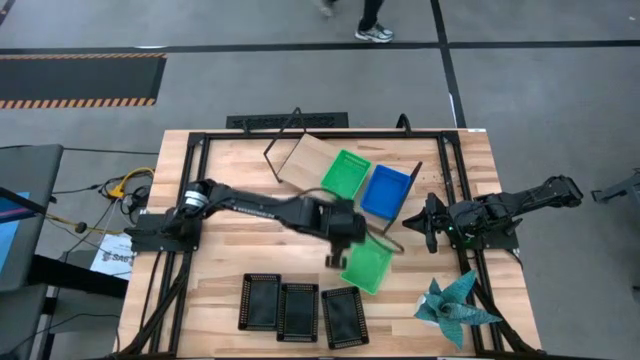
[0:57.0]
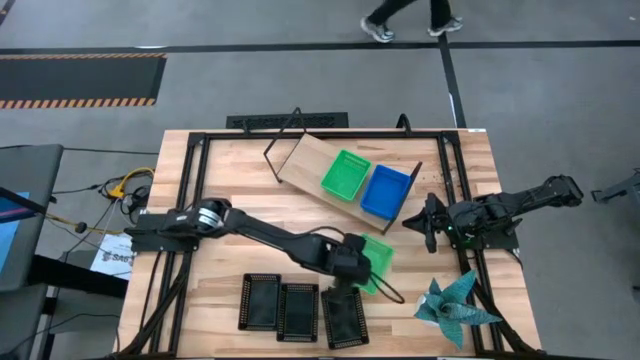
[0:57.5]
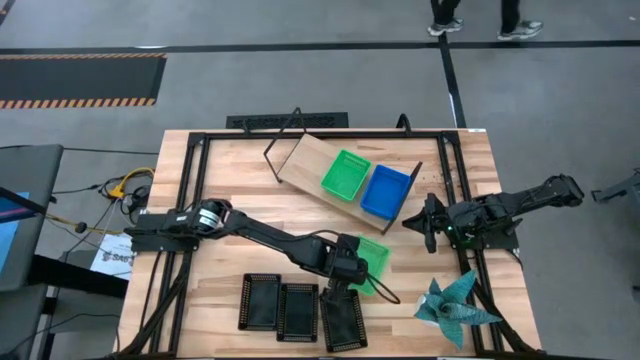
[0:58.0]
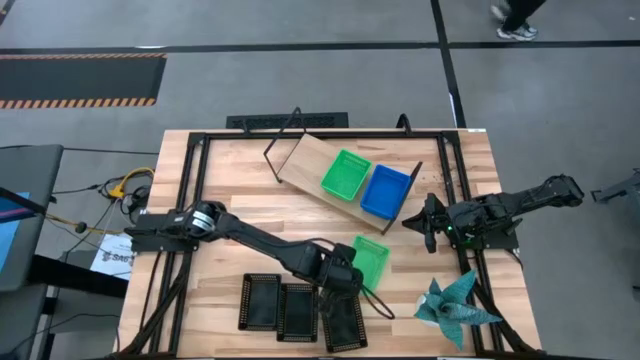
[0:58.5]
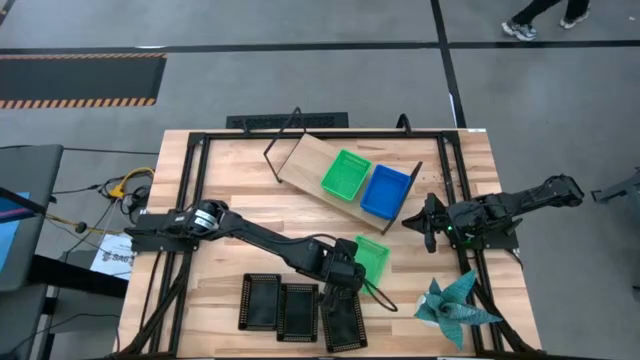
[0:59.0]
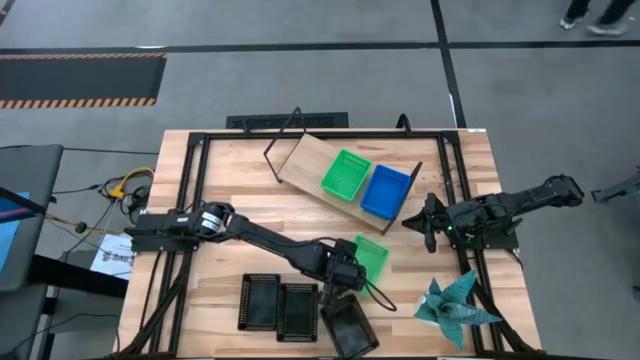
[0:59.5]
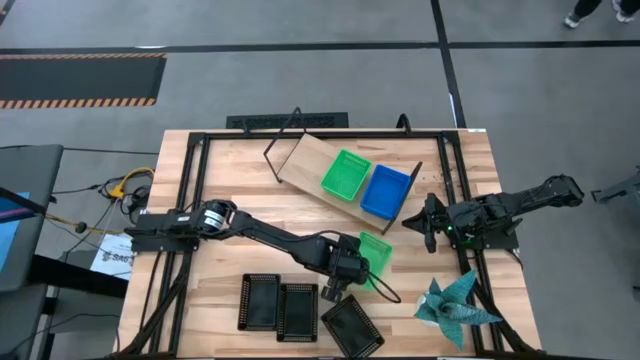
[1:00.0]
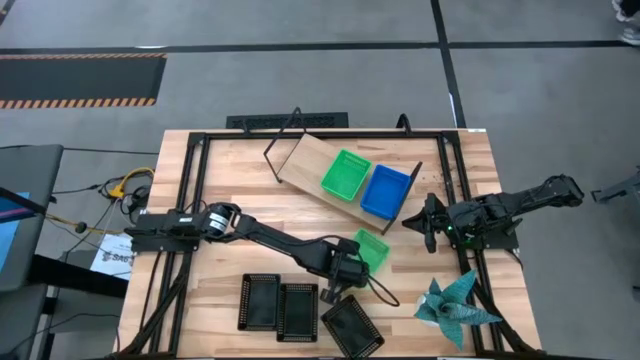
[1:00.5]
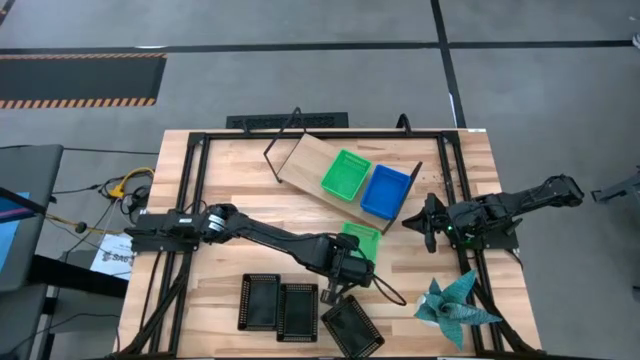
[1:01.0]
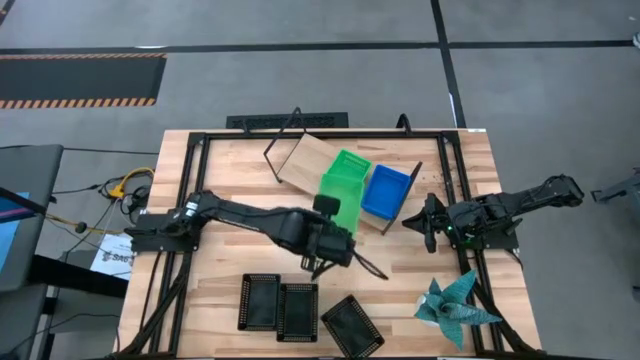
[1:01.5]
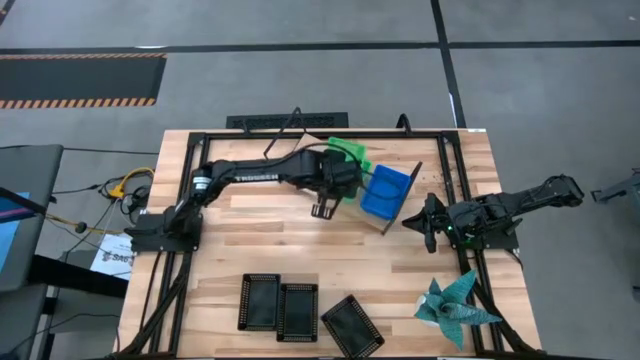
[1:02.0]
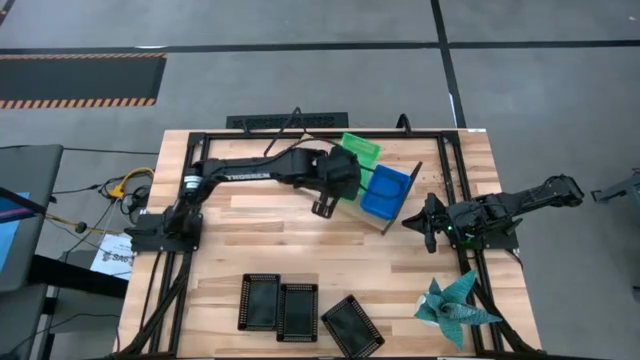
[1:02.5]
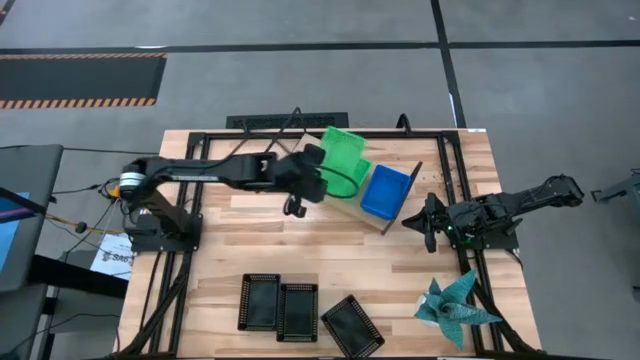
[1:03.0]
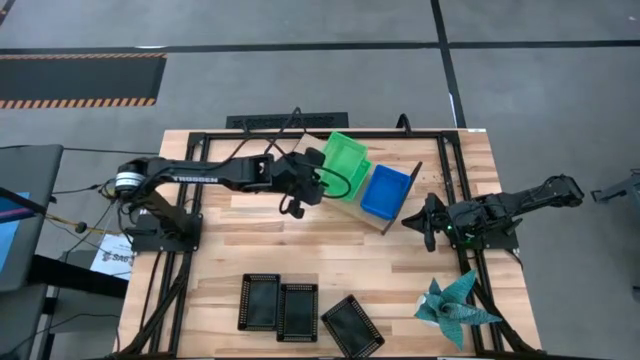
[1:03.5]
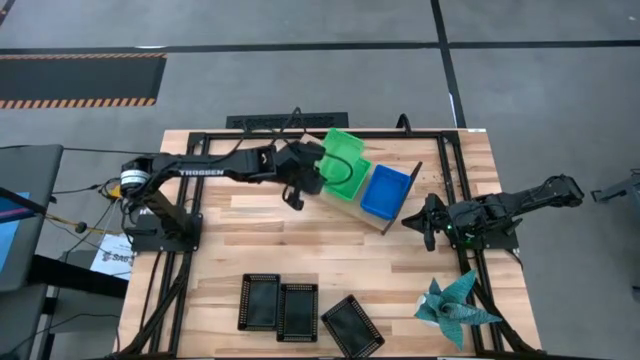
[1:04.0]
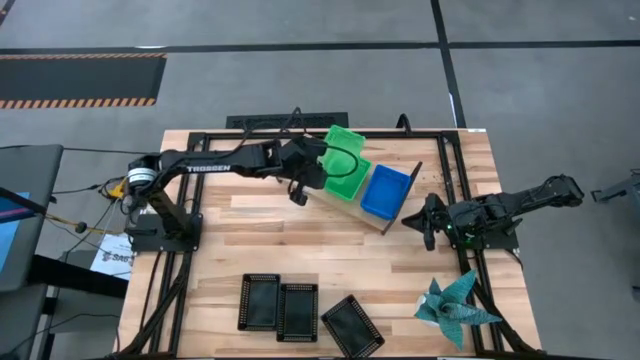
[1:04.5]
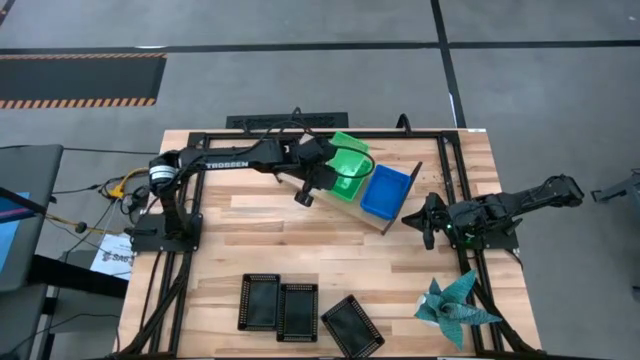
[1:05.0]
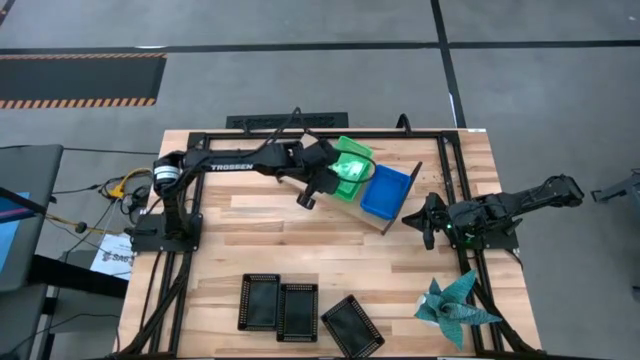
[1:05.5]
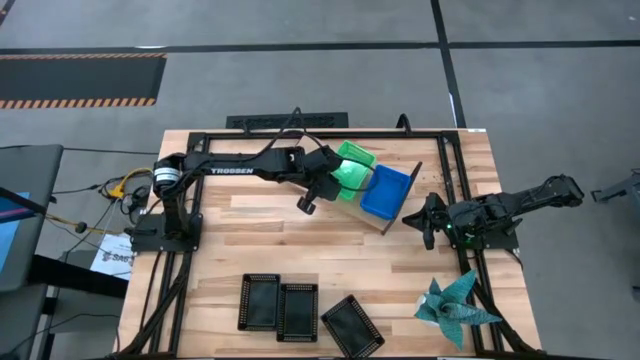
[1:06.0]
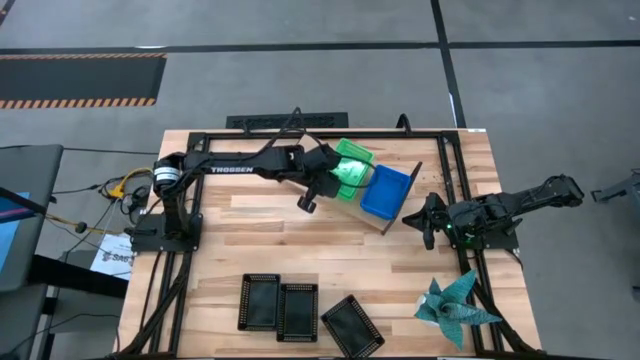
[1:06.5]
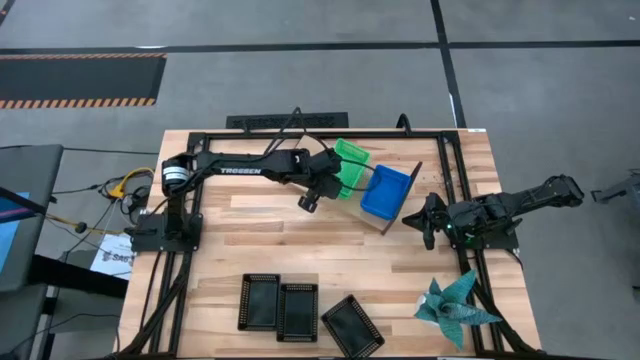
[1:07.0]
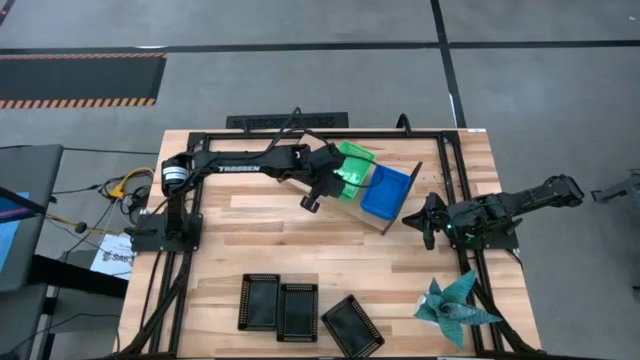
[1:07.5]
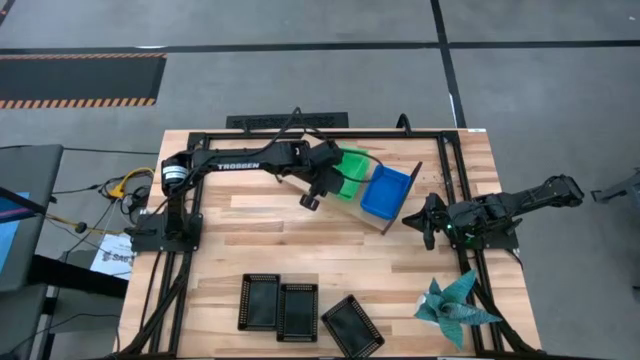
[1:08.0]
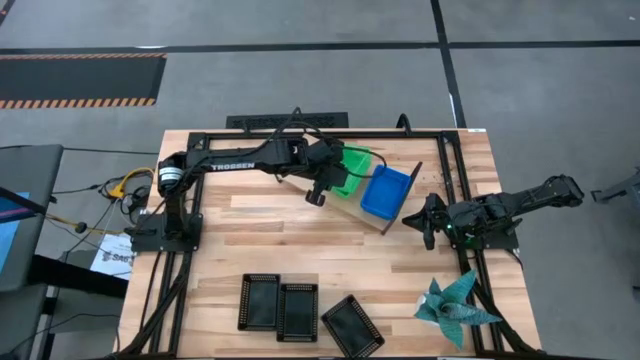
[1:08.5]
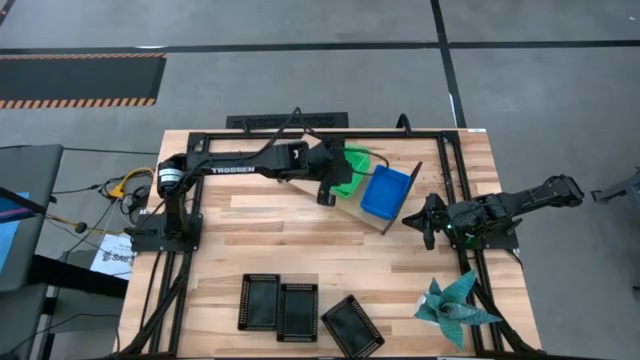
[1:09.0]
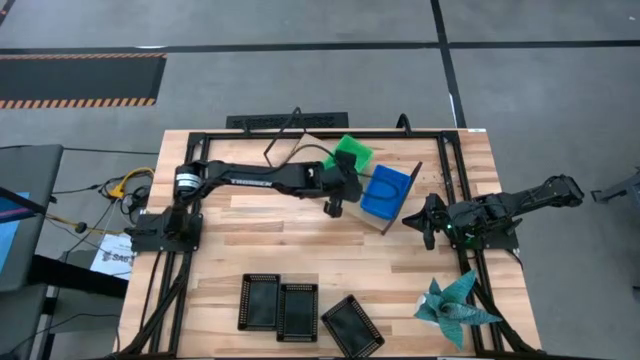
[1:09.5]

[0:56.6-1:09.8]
Task: Stack baskets on shelf by color
Stack the green bin on the green bin on the shelf

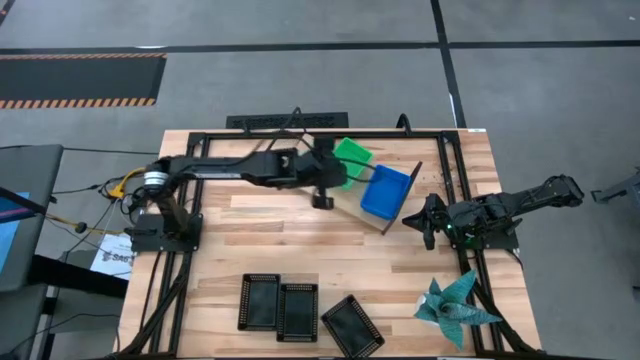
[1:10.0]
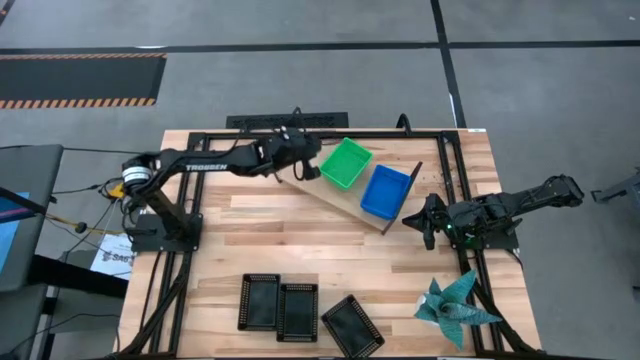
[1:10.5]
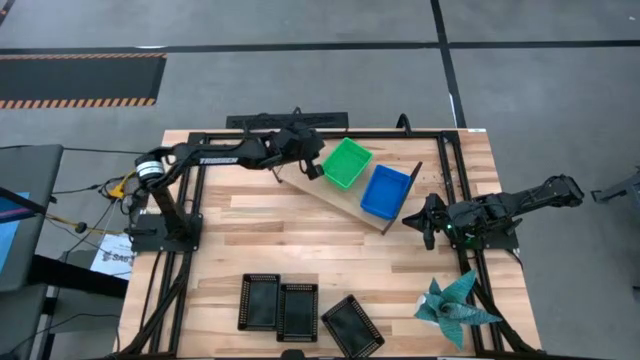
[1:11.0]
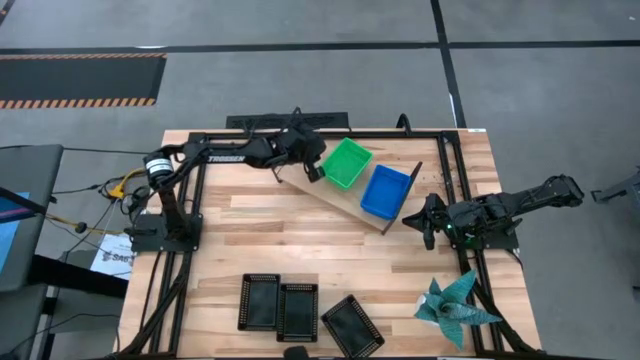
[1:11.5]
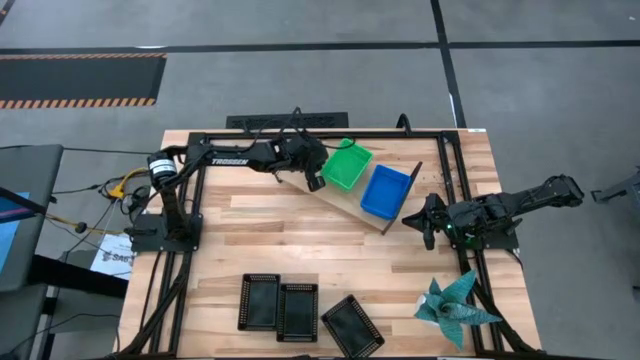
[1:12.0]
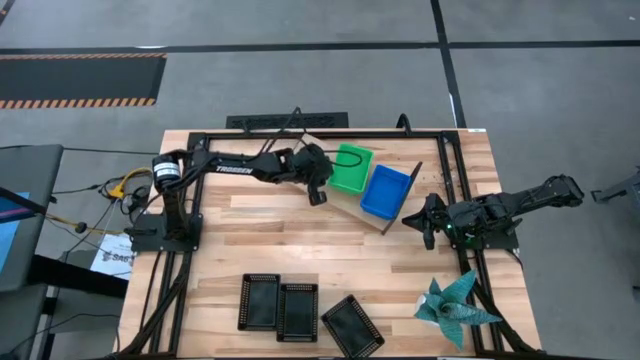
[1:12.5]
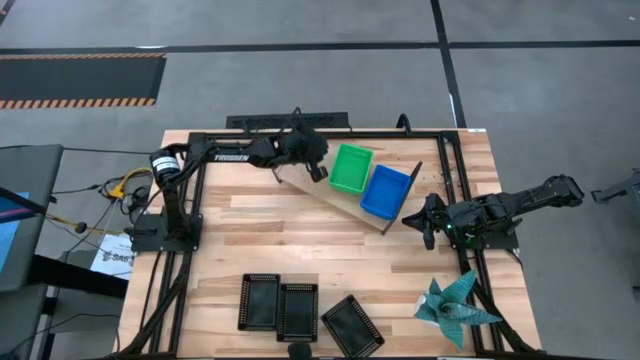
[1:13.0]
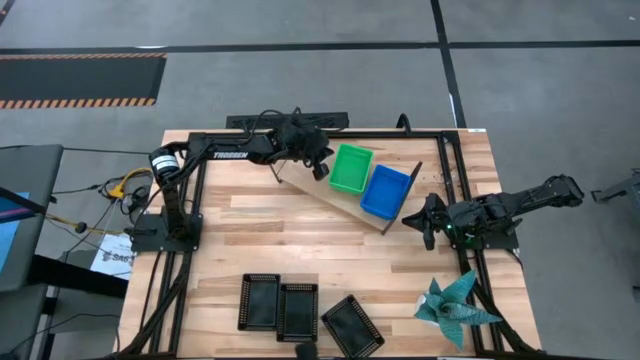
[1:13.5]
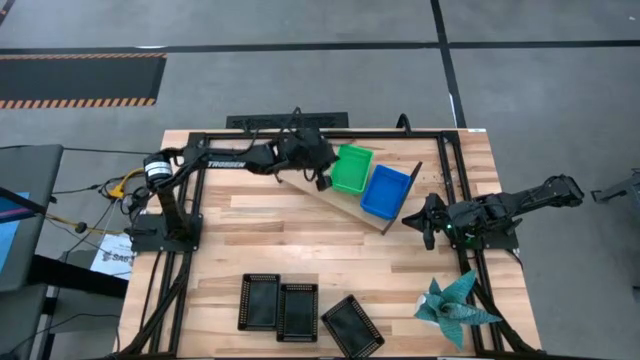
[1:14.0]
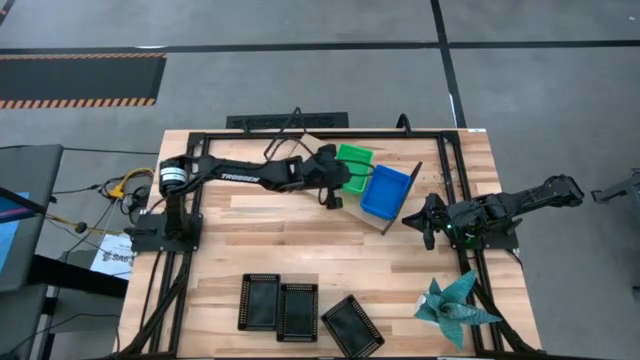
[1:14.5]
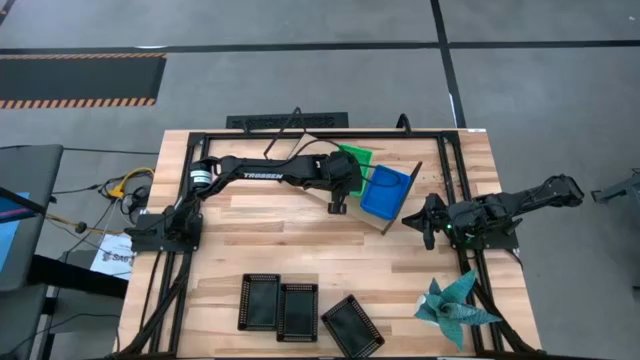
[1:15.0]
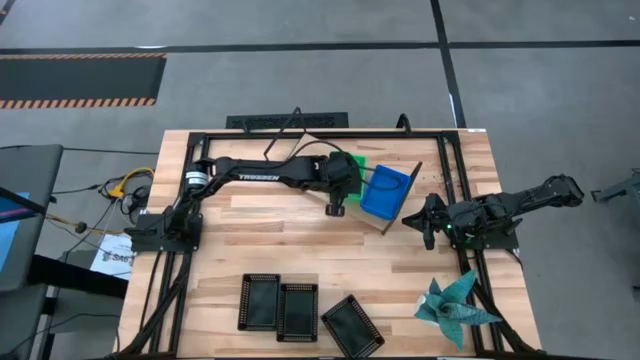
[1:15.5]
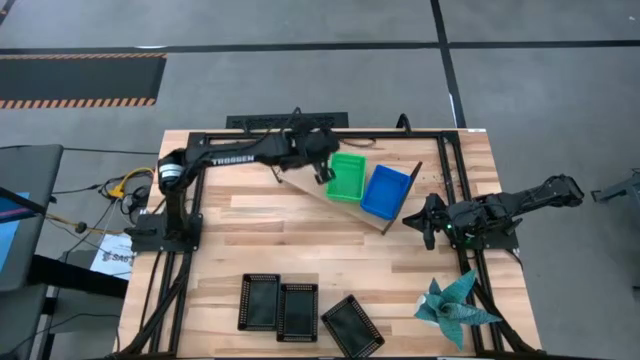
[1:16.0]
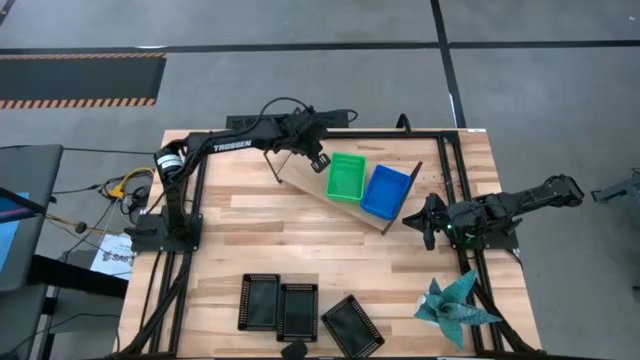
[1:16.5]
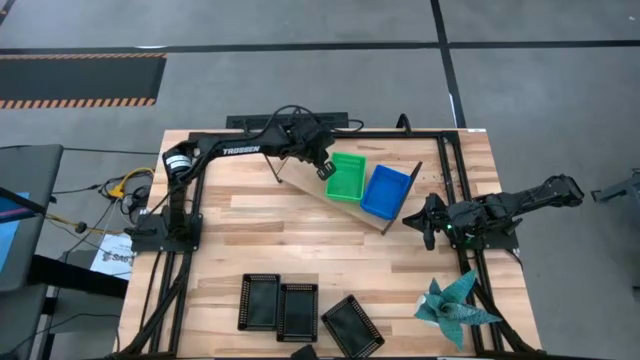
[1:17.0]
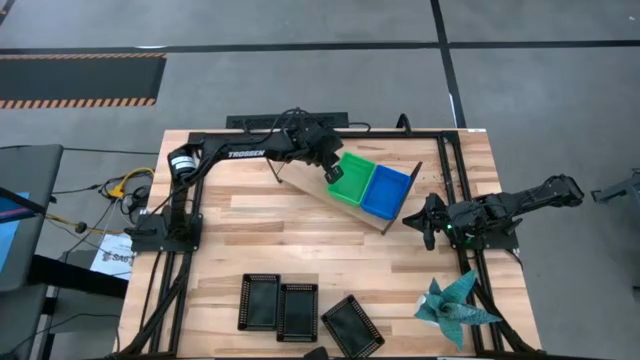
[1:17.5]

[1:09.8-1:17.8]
Adjust the green bins

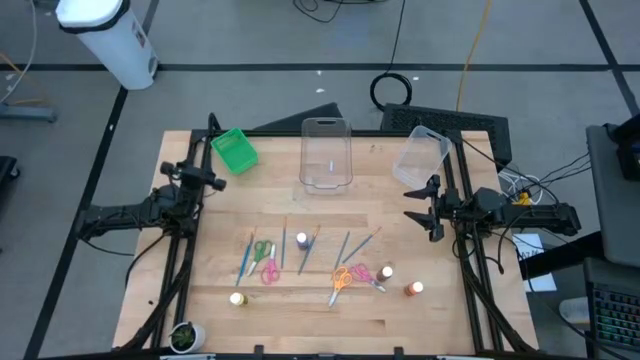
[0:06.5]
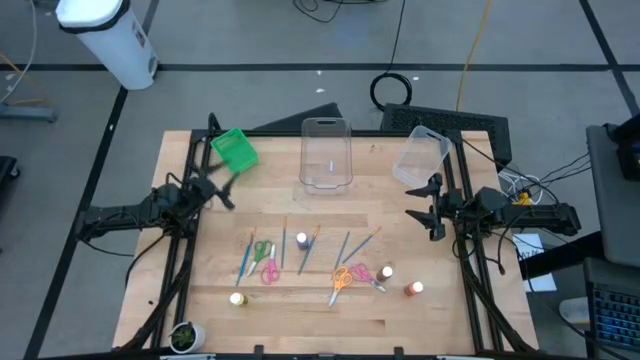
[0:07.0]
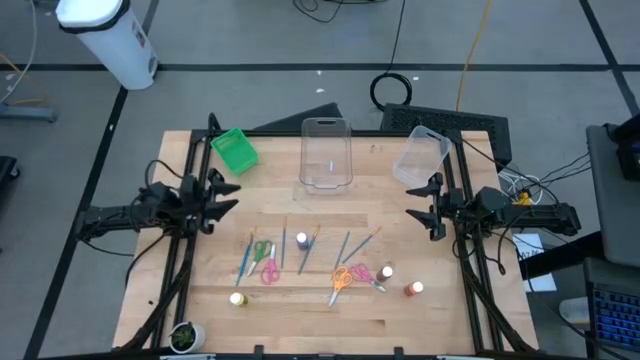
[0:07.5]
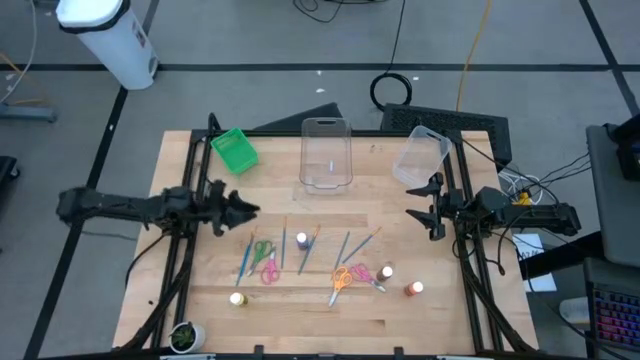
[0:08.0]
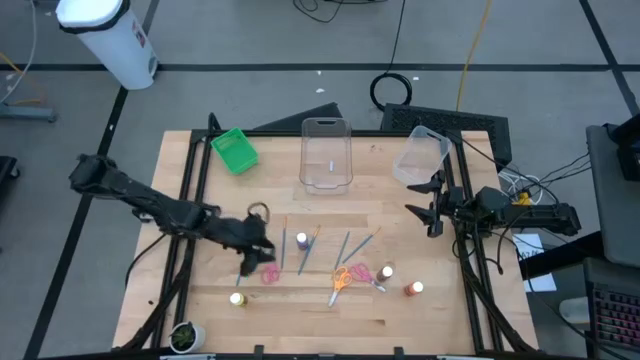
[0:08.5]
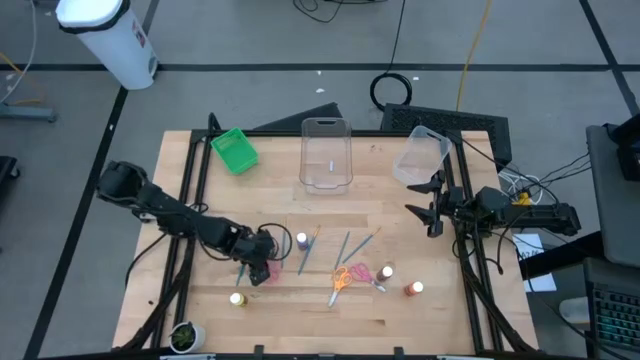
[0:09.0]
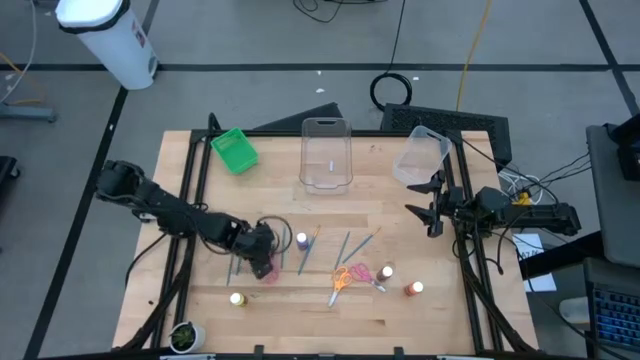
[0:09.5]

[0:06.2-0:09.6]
Task: Pick & Place Paint Supplies
Put the green scissor into the green bin
